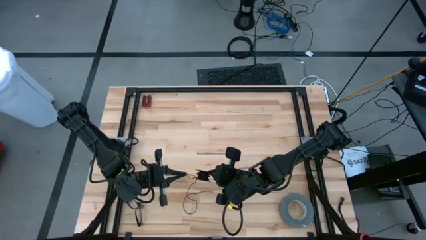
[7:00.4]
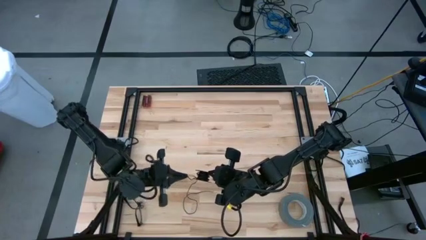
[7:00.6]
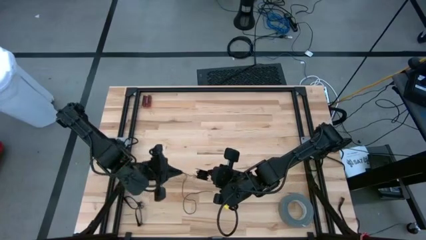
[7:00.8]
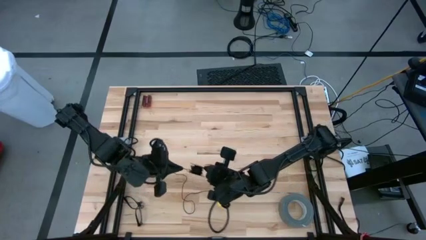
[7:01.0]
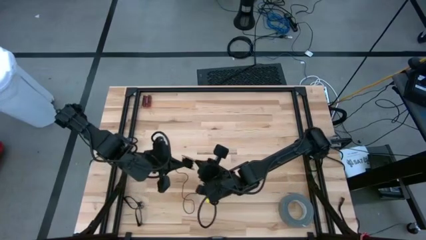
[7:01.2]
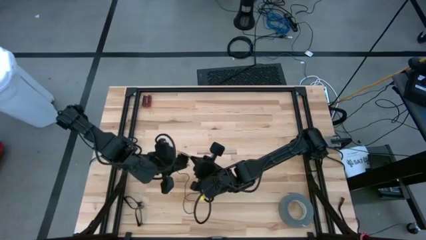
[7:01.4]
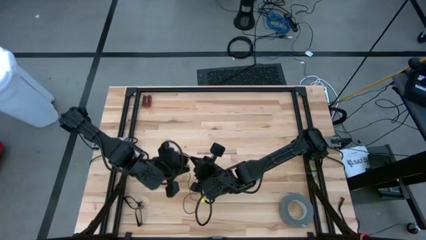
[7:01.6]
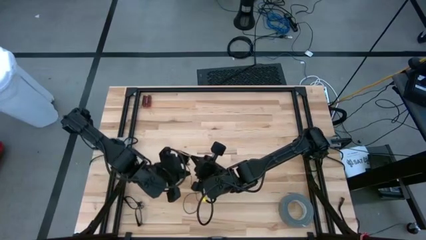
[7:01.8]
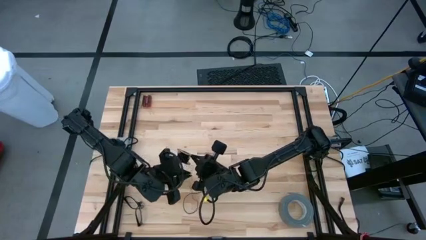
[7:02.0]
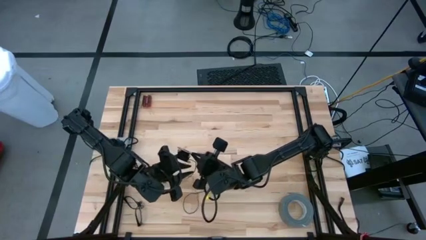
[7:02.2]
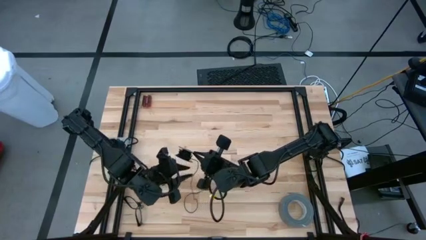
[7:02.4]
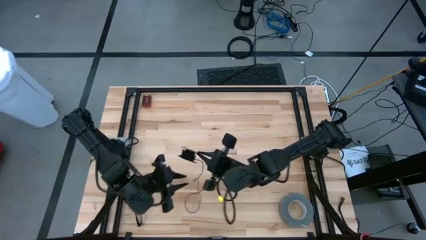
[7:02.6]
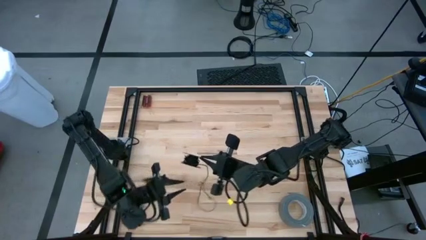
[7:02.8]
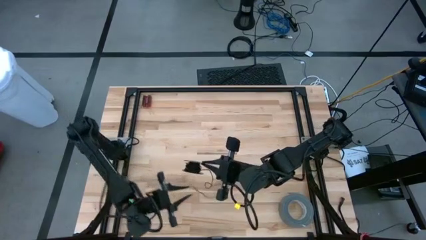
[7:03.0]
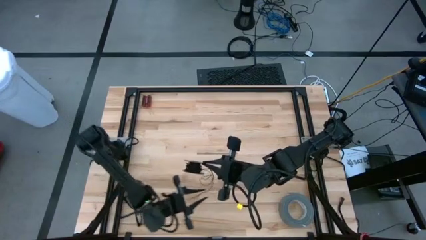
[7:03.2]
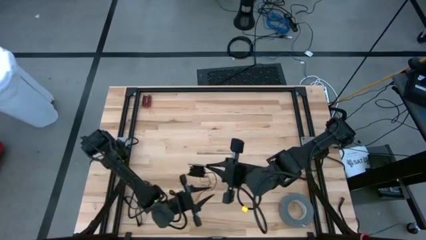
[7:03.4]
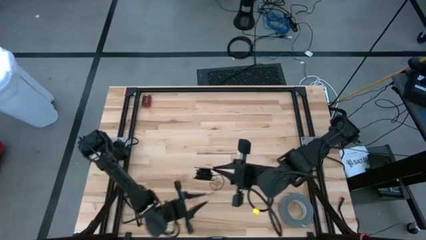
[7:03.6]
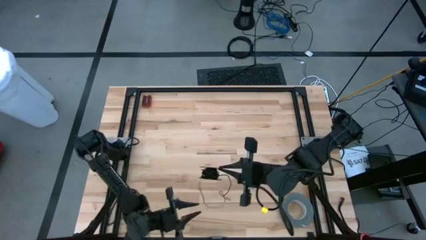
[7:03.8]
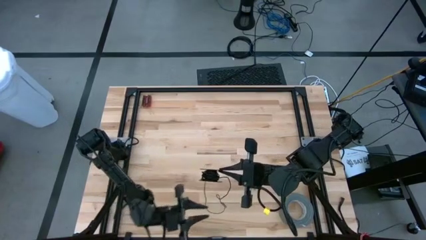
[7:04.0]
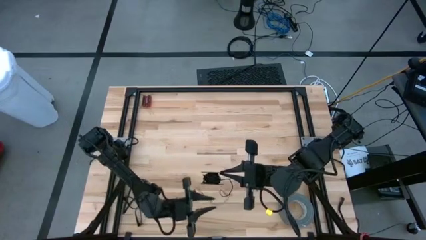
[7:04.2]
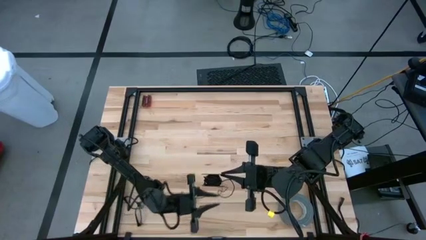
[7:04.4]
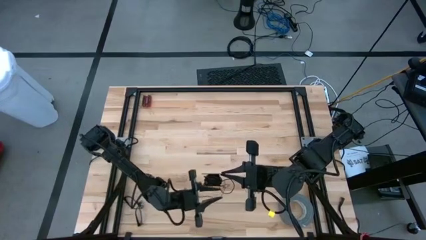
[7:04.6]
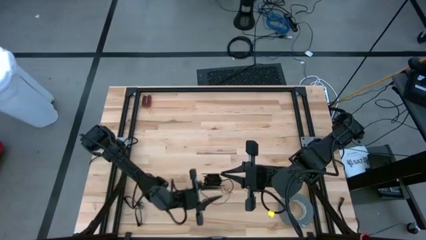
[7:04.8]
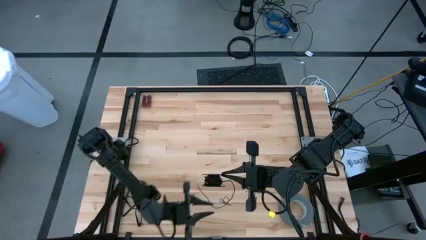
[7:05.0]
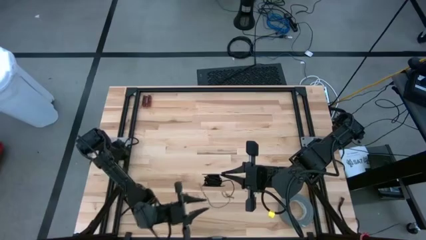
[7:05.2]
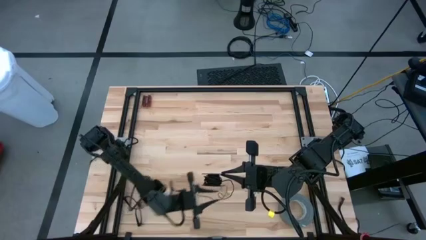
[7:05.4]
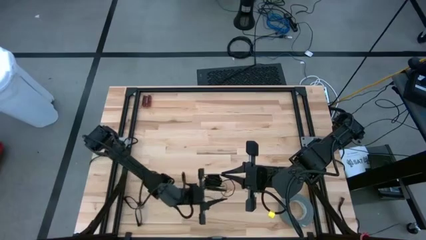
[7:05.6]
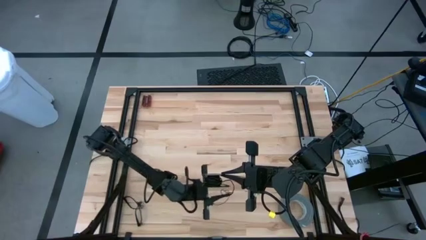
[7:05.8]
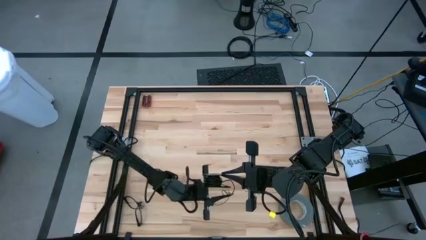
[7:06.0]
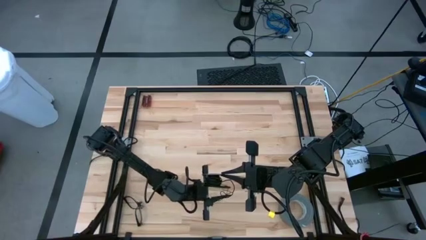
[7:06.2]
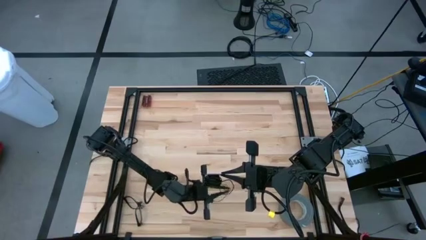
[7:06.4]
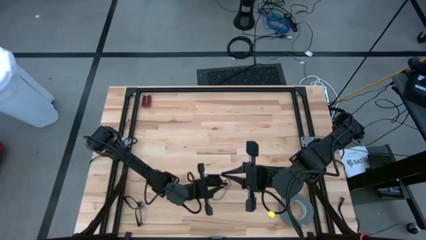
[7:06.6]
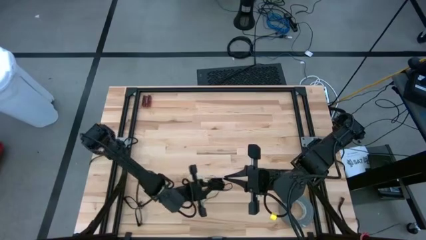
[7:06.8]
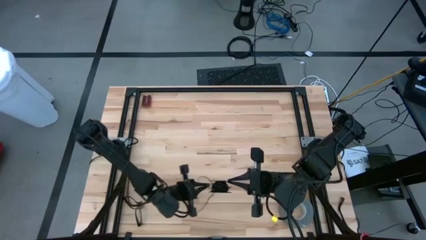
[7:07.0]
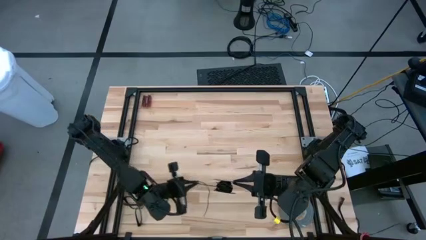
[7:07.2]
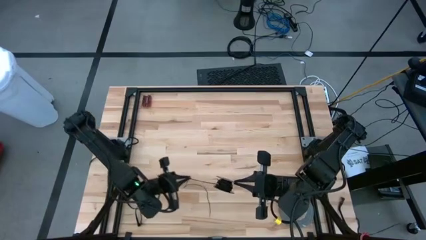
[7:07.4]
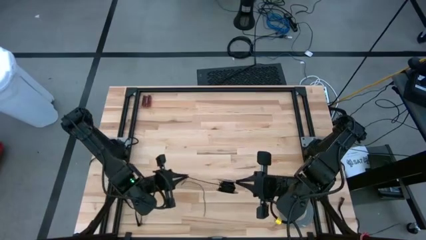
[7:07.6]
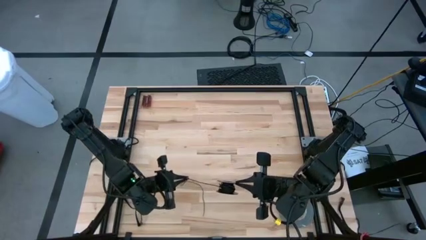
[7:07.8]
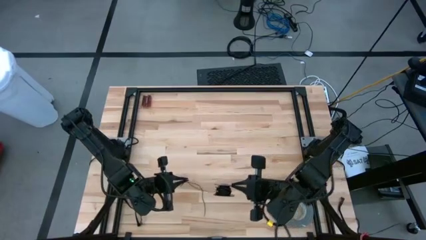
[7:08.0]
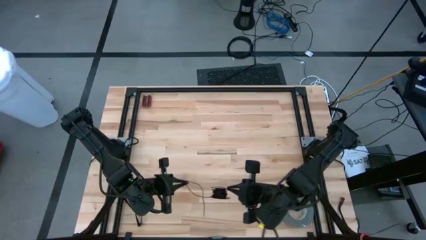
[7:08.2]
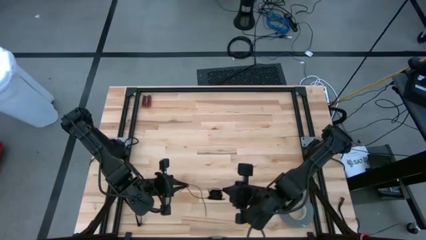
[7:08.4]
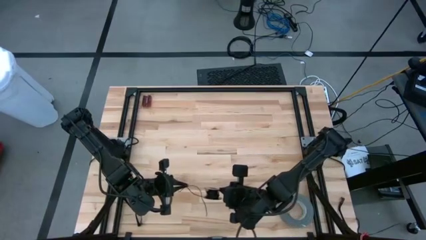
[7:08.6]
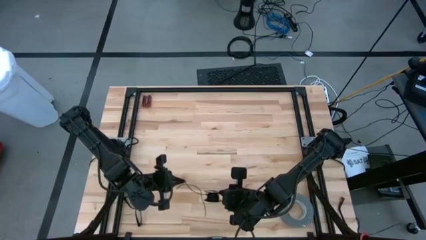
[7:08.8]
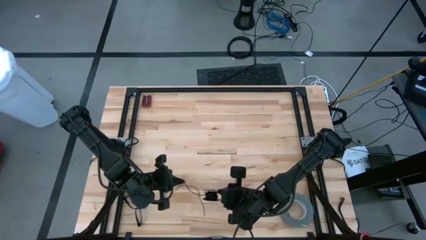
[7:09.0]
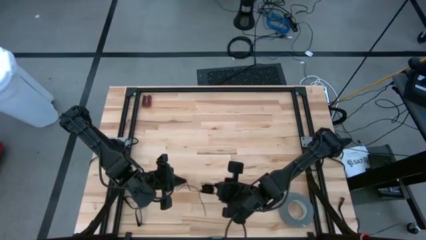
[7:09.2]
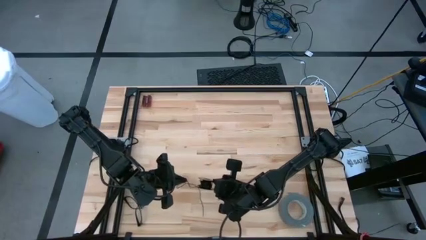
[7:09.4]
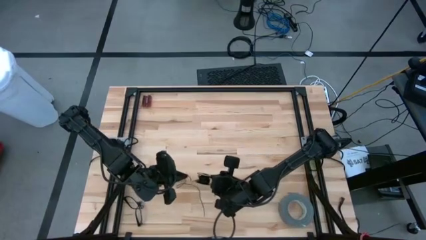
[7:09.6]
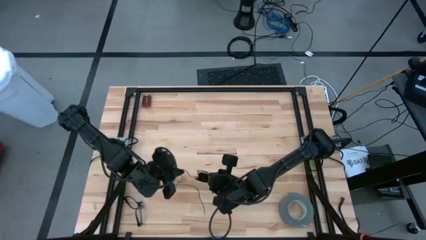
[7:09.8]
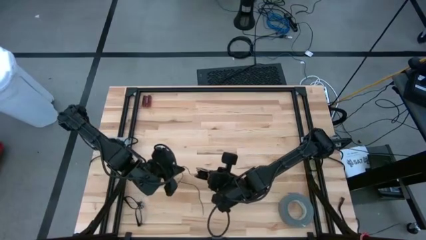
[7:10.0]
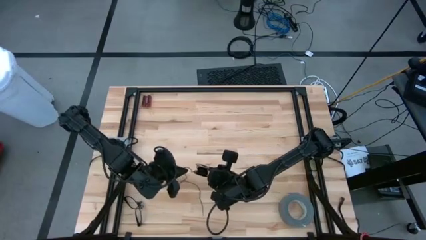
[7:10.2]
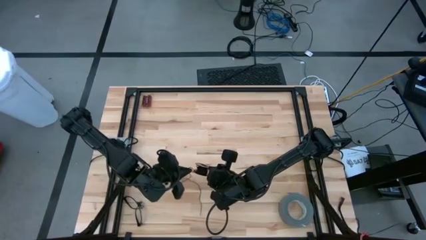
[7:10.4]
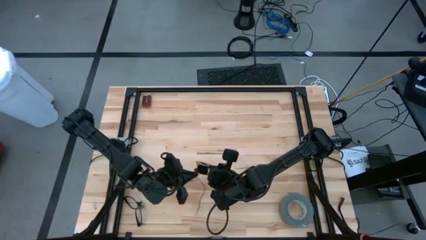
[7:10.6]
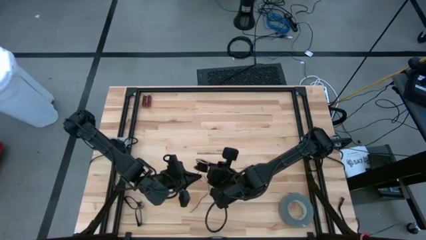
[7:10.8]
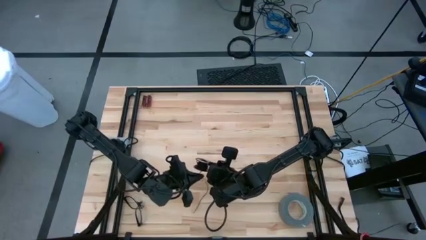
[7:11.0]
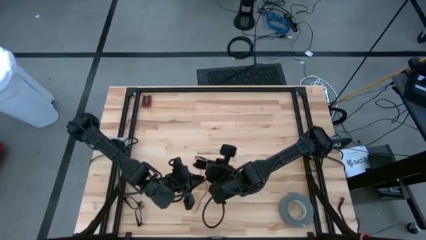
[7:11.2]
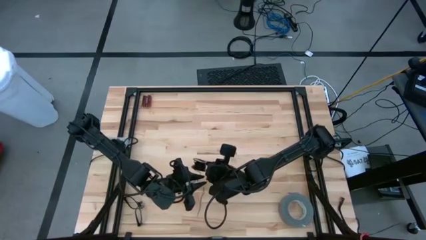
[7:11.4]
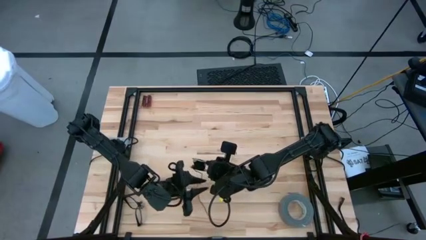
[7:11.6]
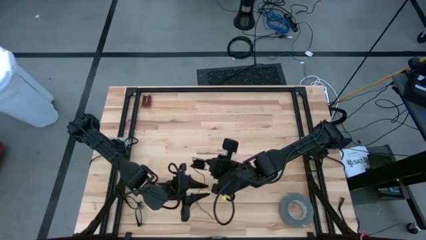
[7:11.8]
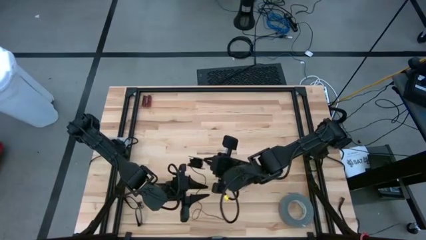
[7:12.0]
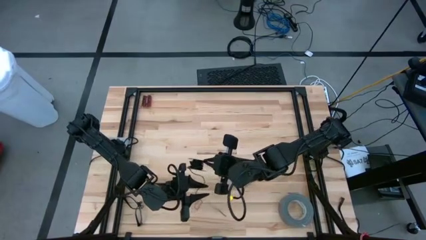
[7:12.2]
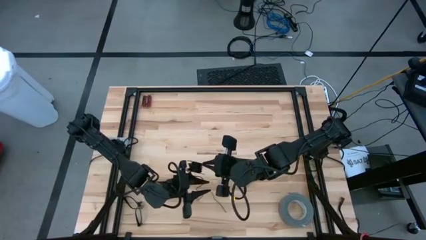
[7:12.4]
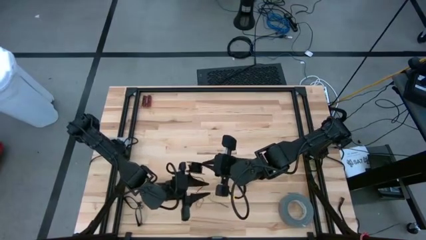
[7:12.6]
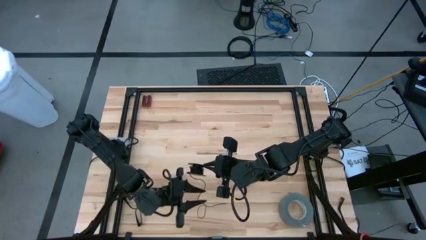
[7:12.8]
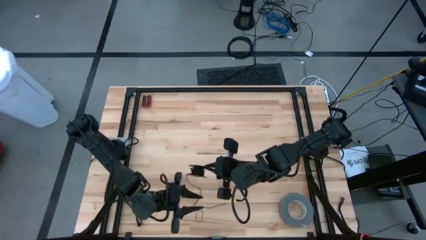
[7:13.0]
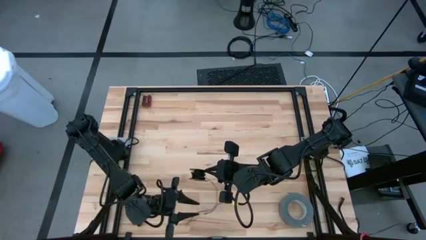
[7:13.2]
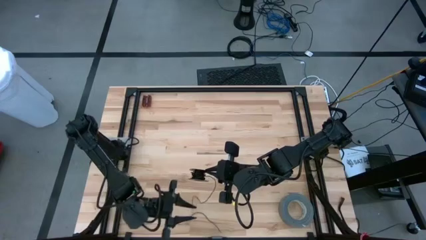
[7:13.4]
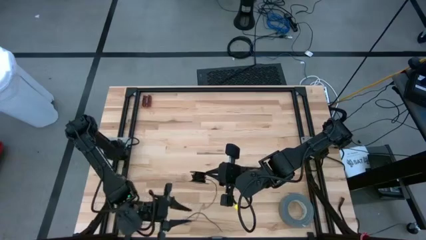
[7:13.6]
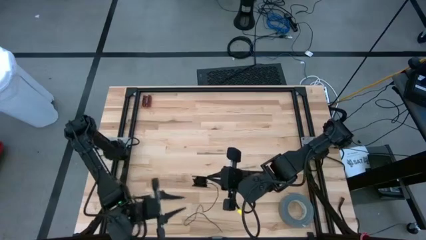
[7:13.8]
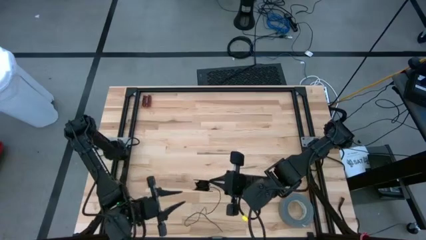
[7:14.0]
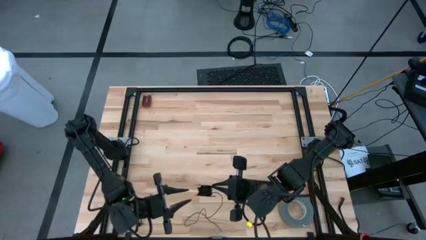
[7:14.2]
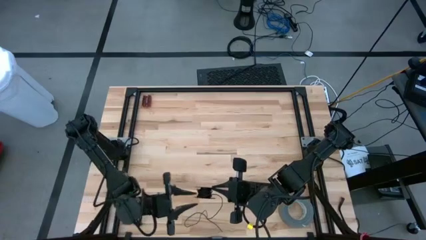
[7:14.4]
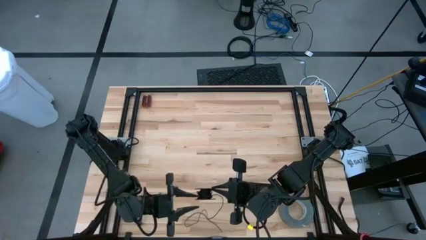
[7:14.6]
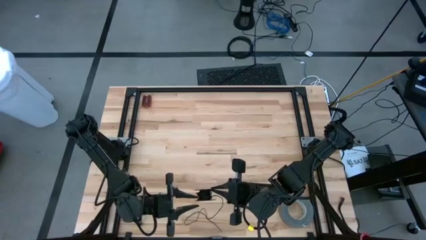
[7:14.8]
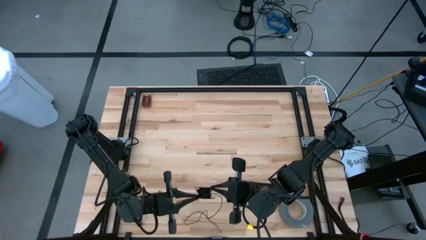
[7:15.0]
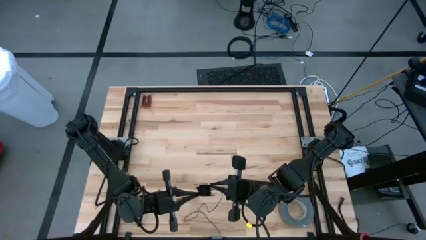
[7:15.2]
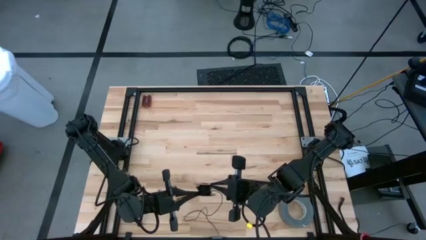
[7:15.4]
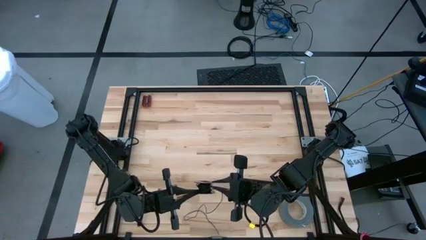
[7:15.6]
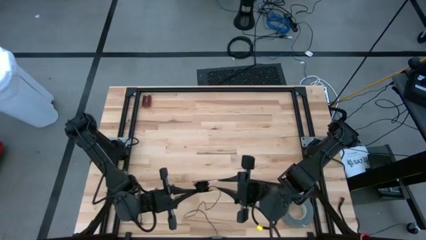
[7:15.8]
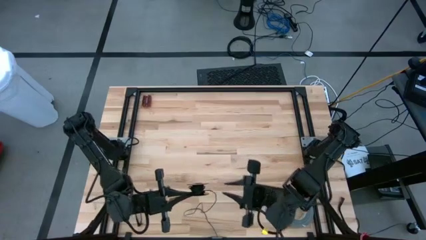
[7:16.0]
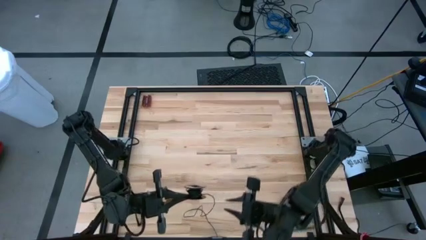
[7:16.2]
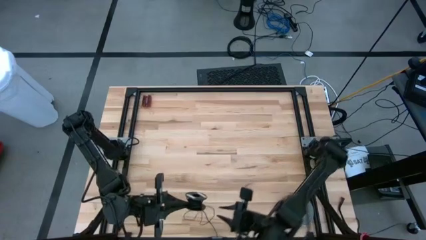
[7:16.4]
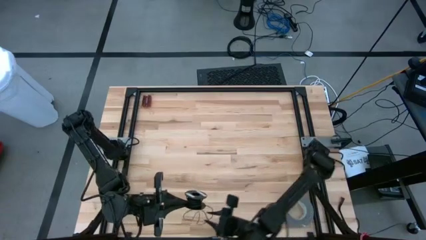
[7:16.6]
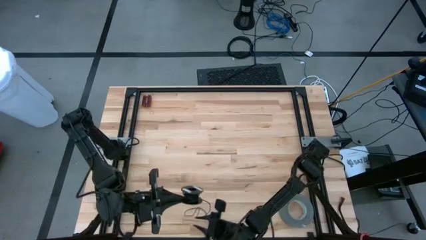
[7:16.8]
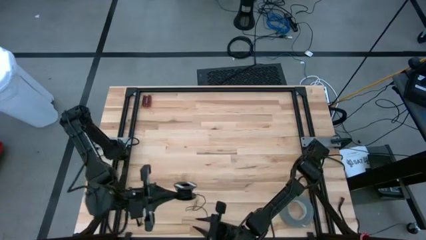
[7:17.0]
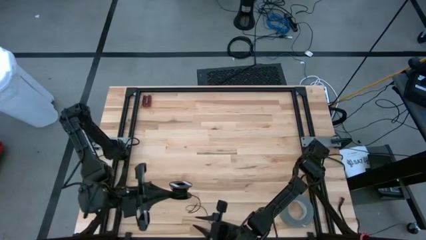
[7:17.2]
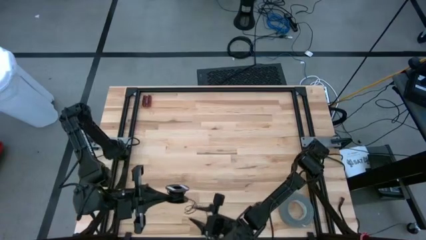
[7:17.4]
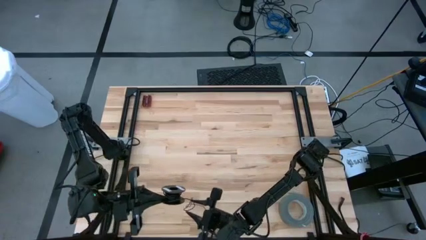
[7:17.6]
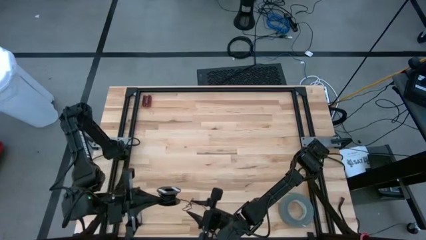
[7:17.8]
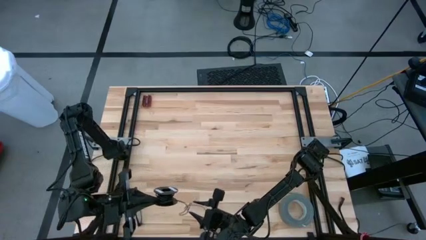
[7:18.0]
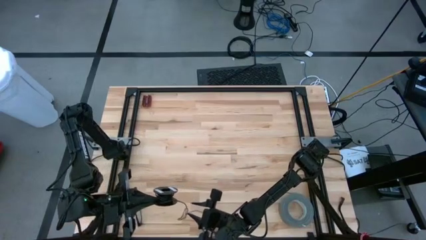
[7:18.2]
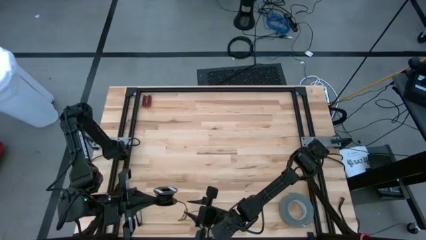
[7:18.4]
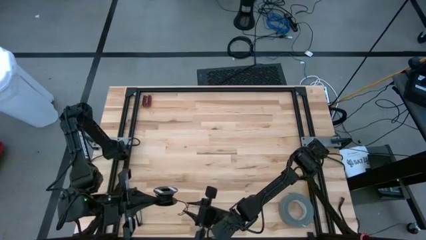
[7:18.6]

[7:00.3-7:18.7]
Task: Coil cords
Coil the black wire on the spool
